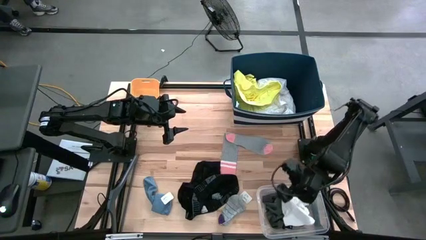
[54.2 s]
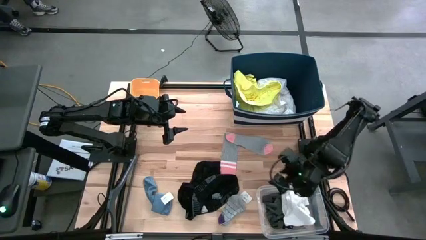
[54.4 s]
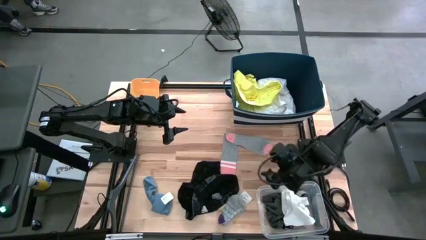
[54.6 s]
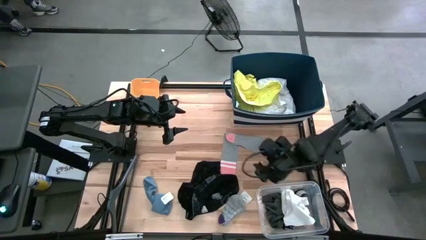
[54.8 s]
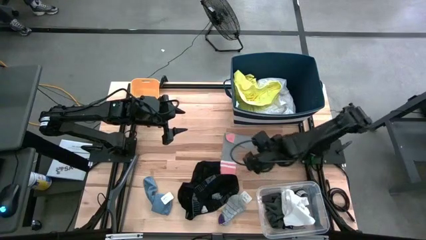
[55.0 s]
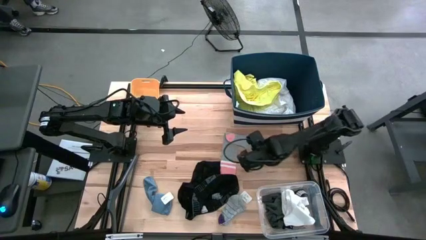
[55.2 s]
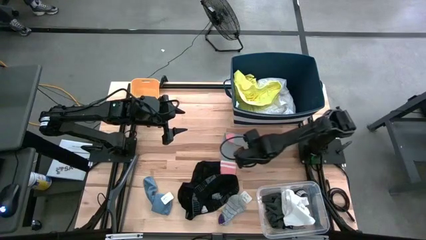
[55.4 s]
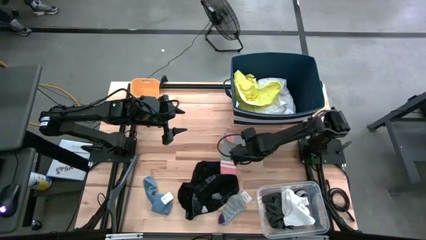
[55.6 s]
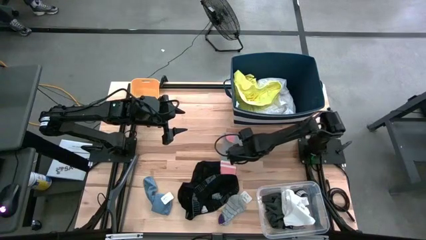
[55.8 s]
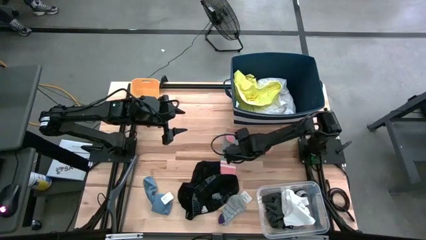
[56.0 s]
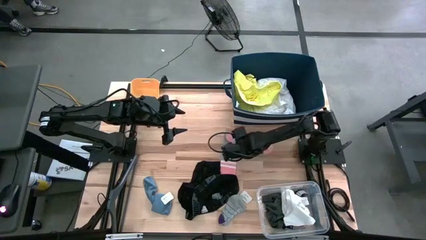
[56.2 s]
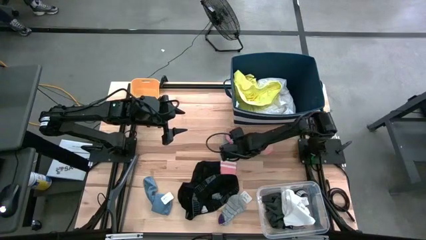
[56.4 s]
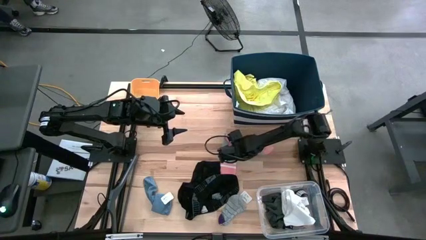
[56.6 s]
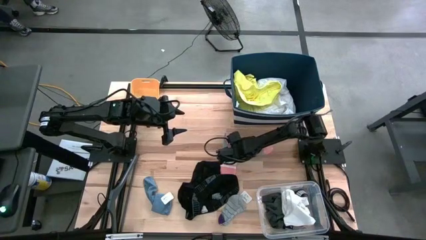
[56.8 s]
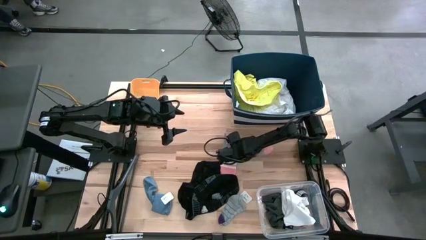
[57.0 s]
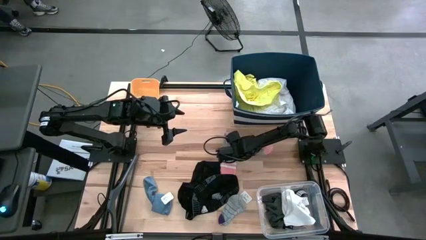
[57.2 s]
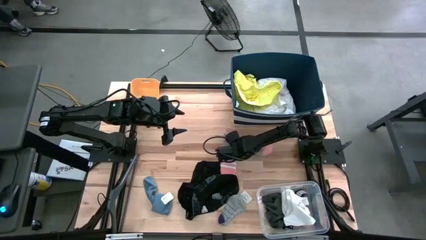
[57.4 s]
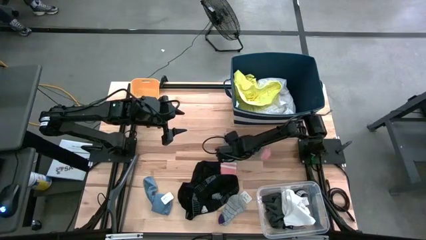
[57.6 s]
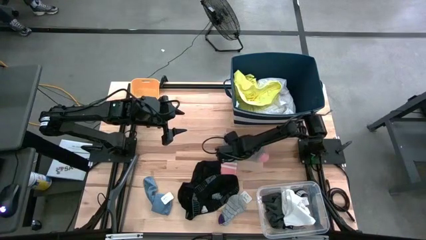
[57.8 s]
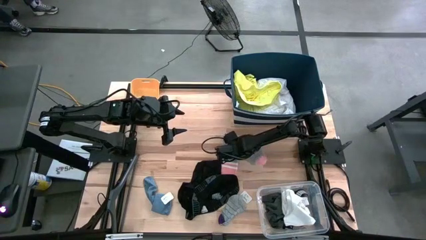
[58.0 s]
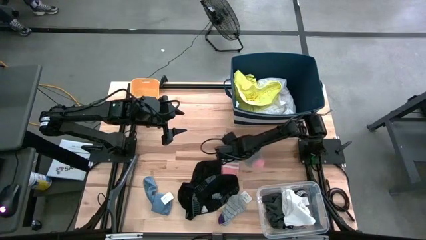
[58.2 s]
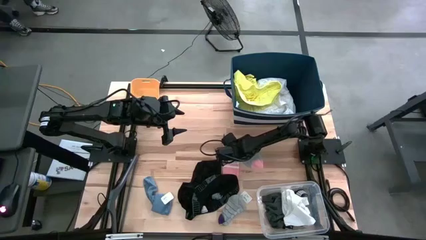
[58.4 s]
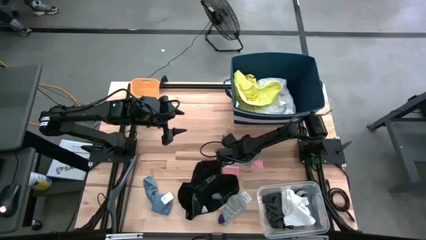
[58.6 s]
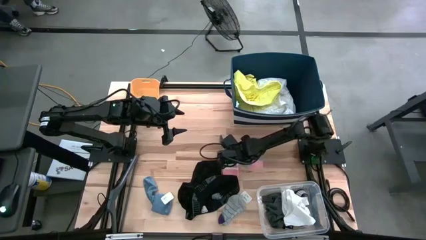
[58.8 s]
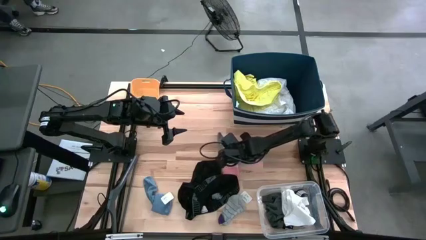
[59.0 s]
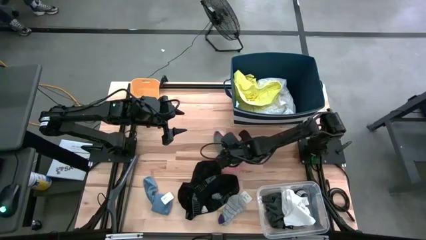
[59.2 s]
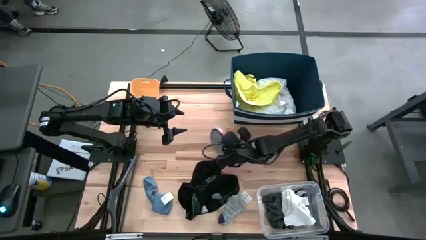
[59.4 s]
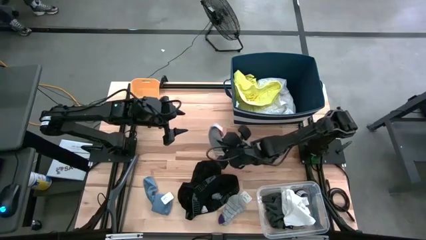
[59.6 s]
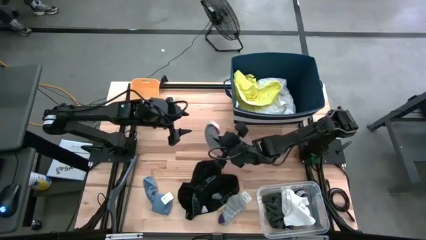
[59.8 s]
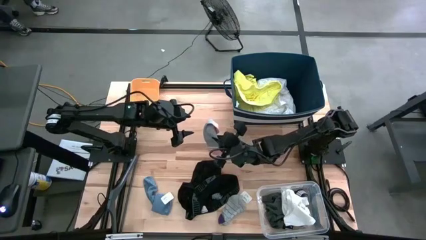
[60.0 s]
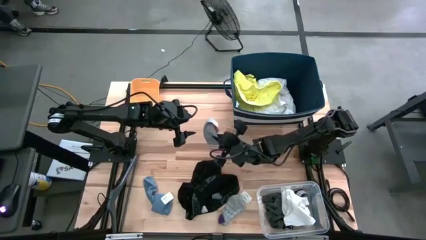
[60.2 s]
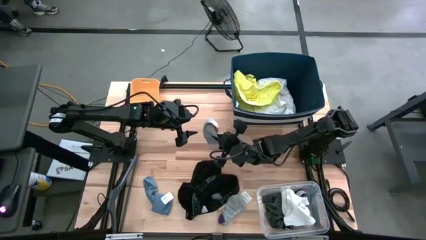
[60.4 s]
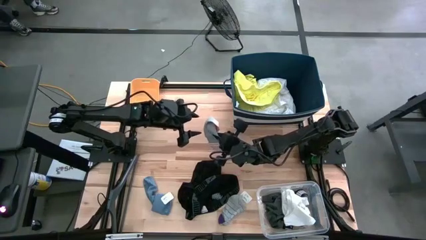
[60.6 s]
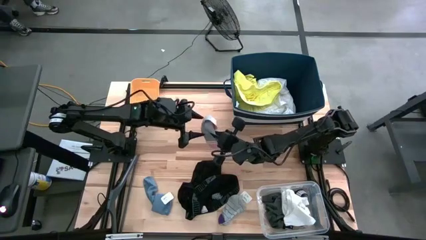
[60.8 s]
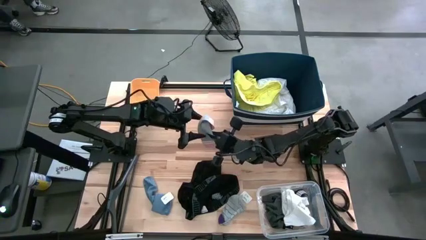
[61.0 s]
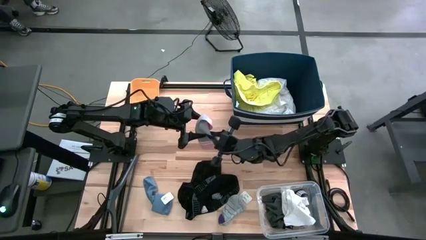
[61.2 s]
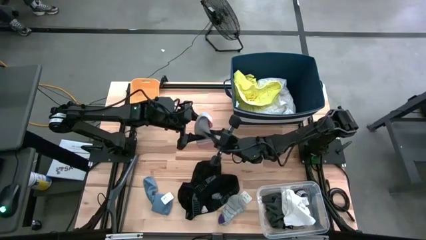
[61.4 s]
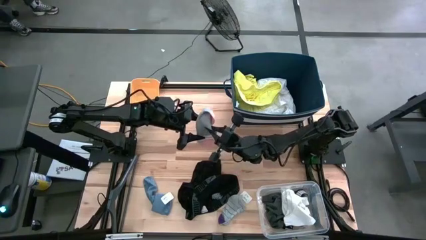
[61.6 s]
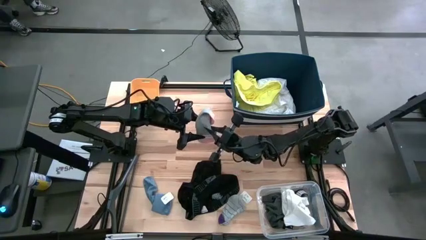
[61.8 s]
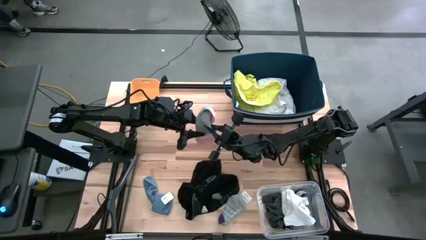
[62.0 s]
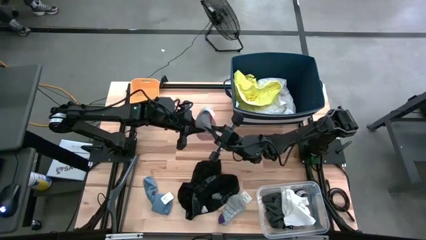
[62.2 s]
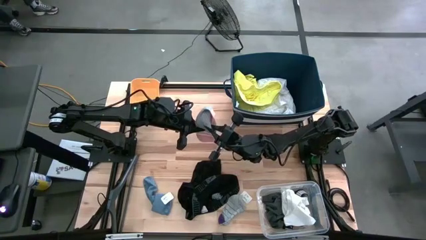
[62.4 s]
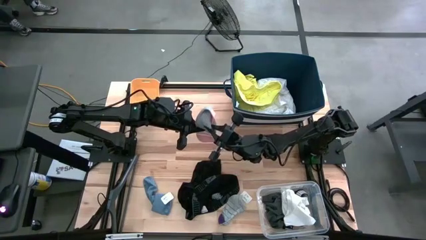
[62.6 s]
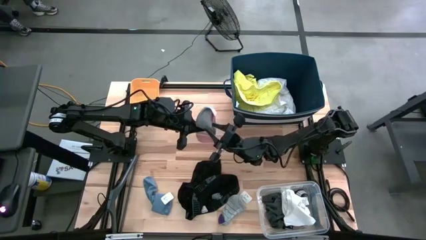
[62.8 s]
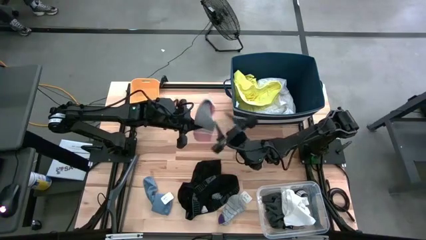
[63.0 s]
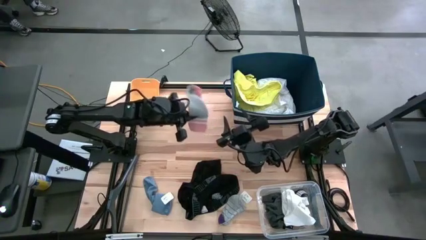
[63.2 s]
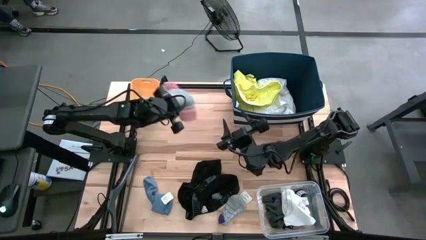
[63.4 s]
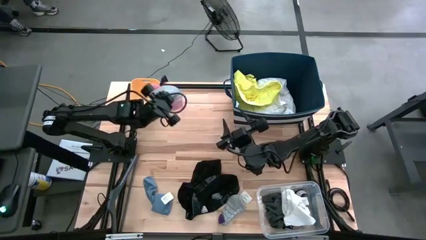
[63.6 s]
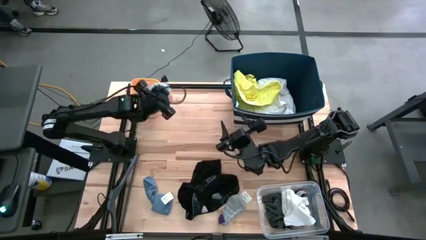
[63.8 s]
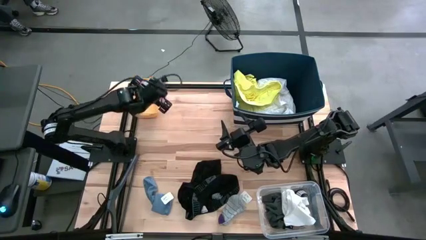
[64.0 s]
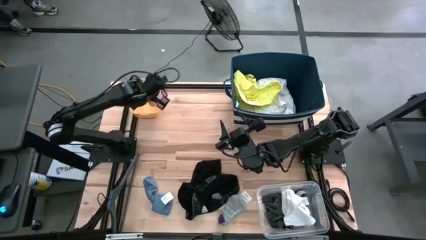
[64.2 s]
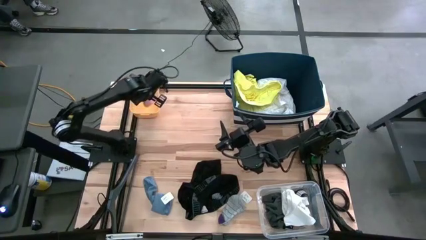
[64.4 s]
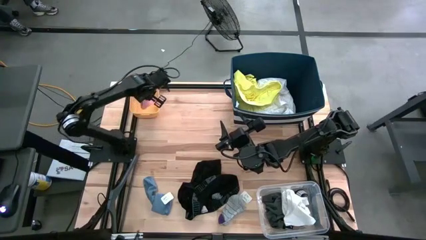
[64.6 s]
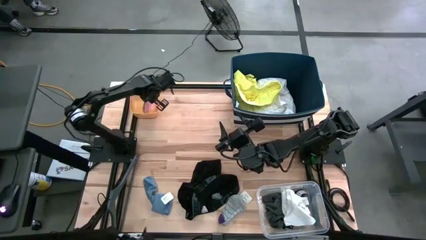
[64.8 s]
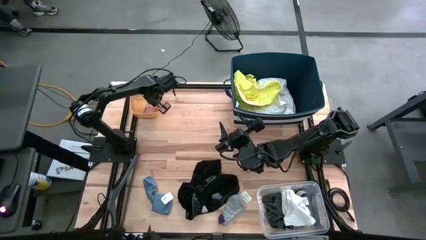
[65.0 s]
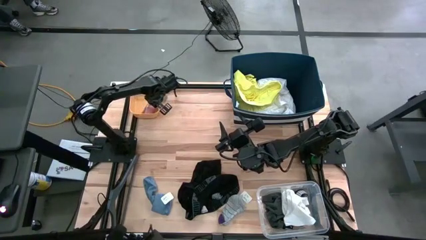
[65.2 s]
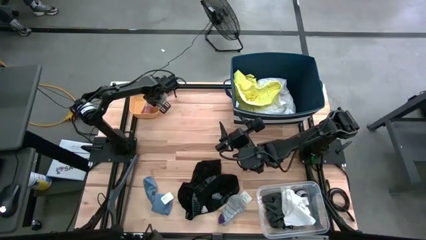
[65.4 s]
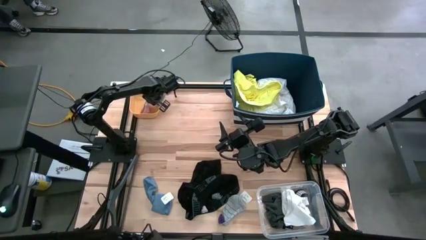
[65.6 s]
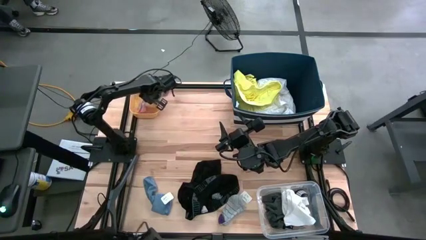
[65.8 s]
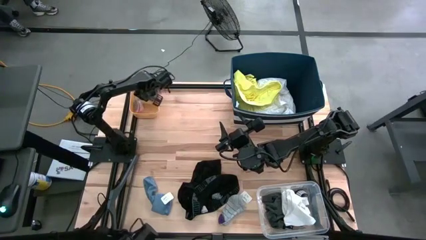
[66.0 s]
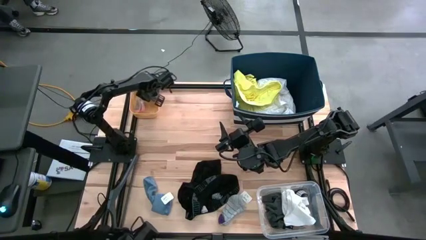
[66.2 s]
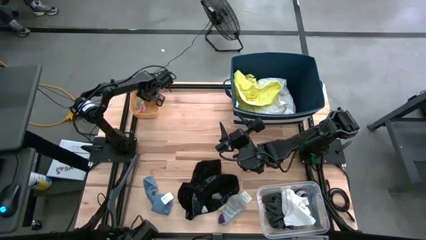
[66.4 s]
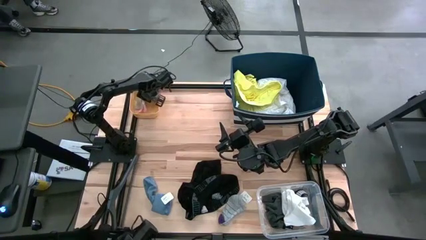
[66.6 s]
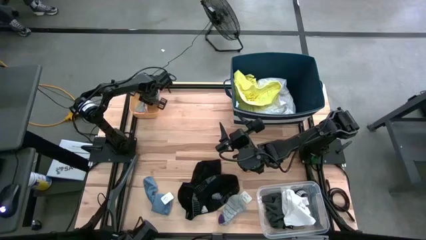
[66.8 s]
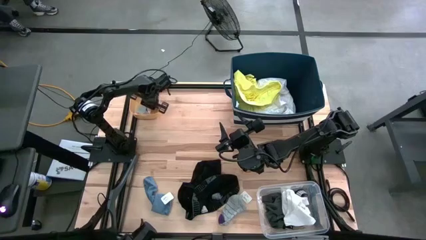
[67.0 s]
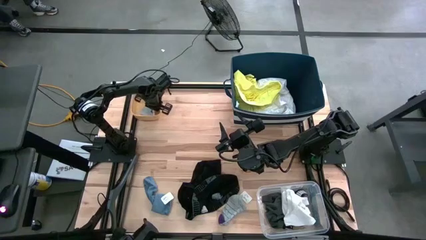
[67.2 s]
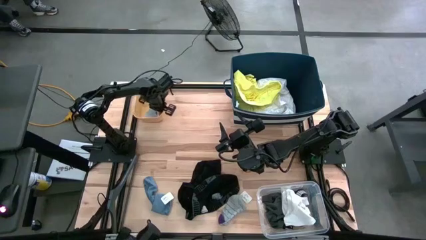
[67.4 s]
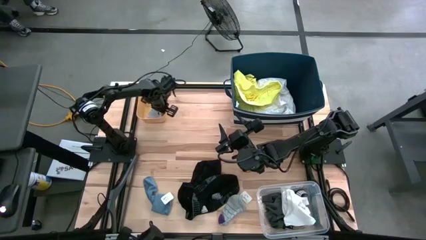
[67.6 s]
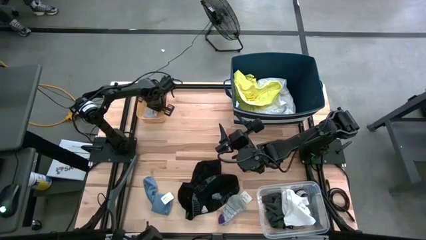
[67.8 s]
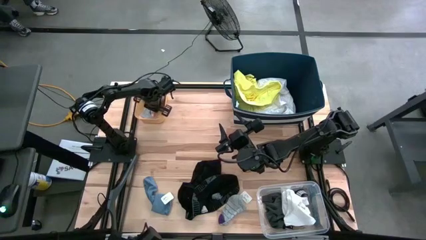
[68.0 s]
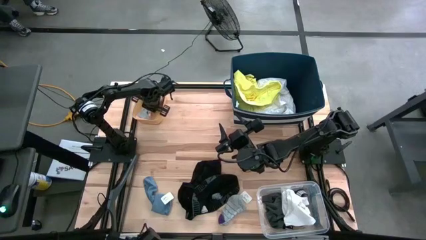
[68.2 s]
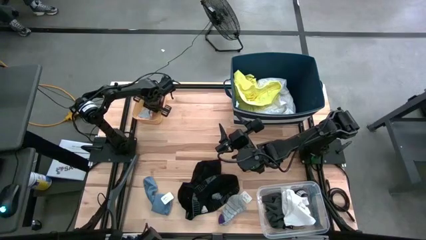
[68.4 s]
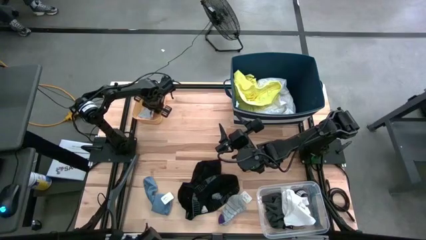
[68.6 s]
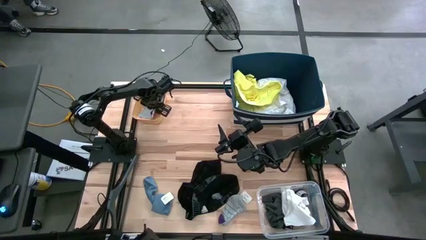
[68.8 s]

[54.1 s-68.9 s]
Task: Pick & Place Cloths
Put the gray and pink sock into the yellow bin
